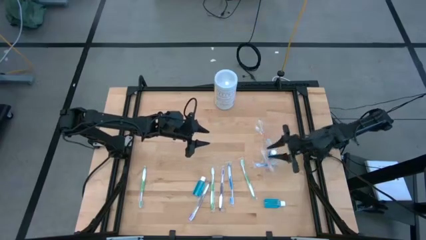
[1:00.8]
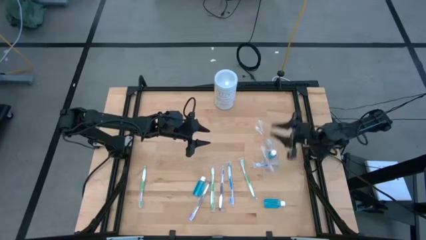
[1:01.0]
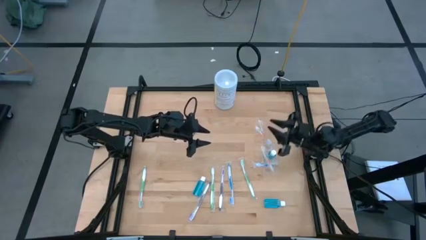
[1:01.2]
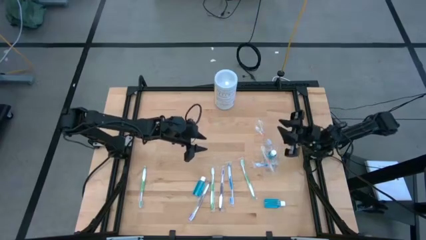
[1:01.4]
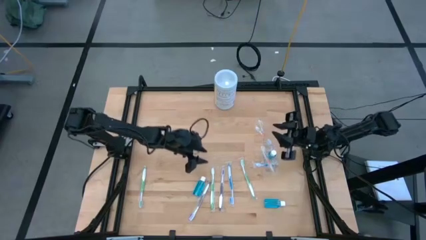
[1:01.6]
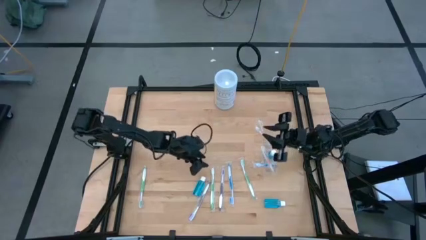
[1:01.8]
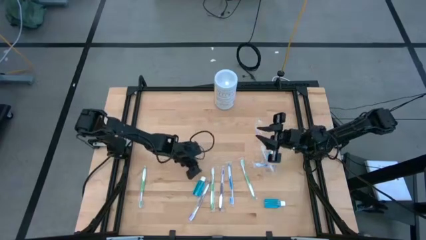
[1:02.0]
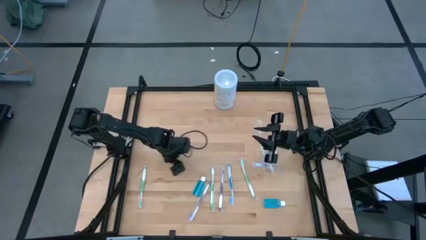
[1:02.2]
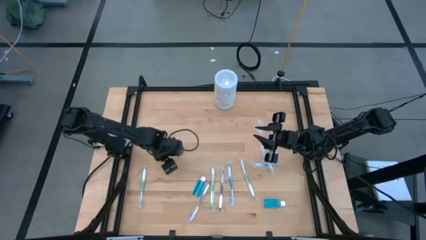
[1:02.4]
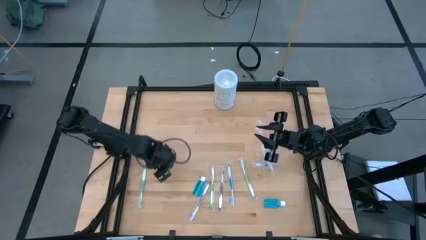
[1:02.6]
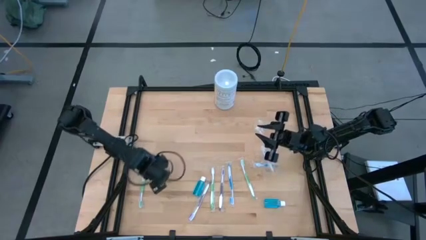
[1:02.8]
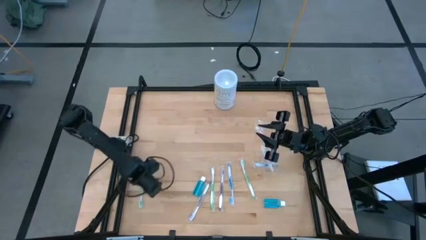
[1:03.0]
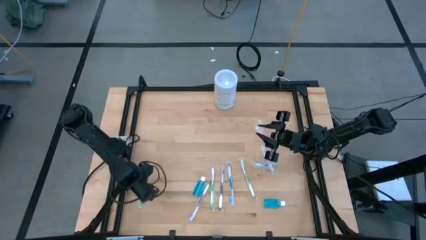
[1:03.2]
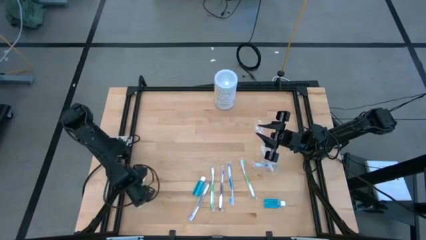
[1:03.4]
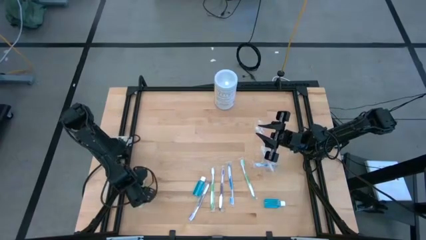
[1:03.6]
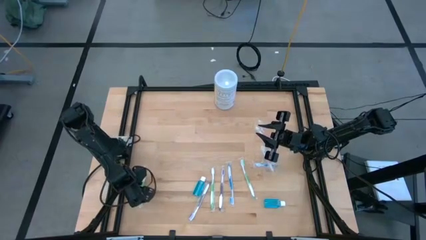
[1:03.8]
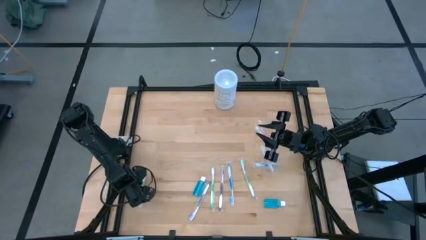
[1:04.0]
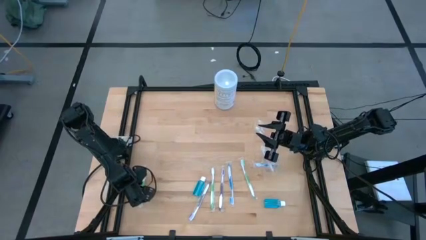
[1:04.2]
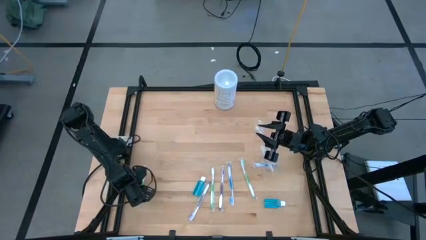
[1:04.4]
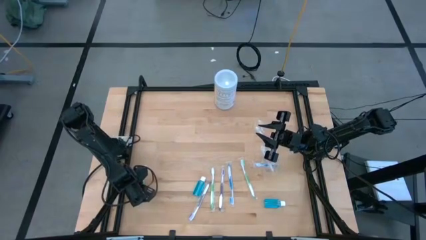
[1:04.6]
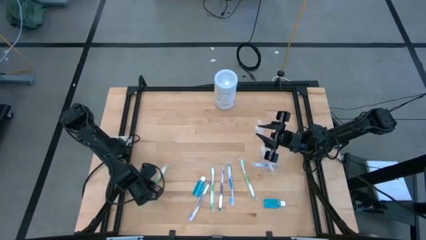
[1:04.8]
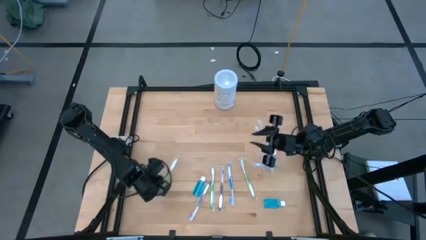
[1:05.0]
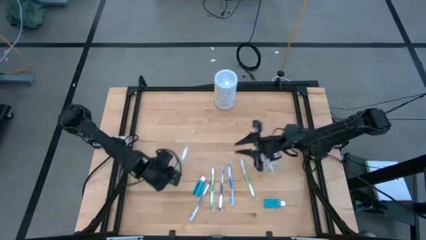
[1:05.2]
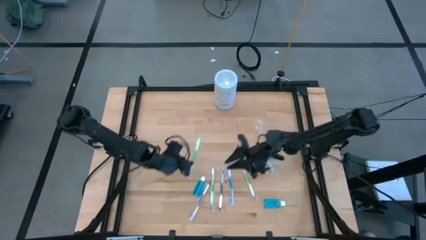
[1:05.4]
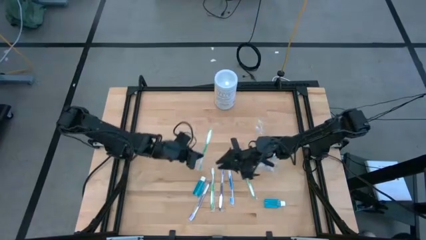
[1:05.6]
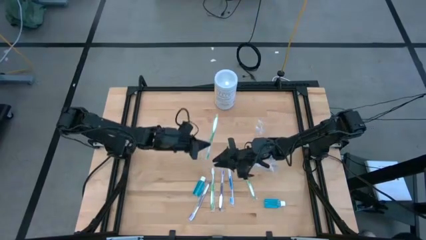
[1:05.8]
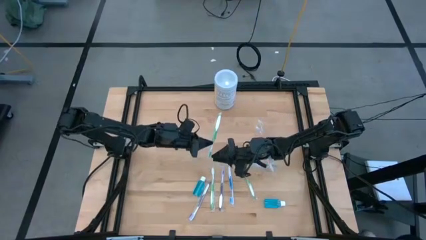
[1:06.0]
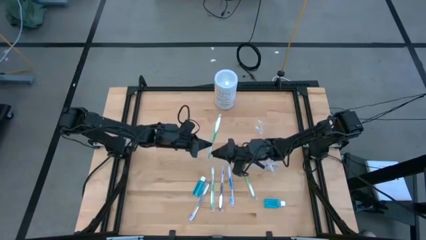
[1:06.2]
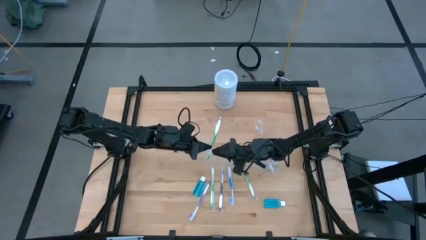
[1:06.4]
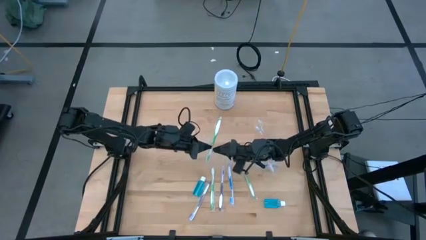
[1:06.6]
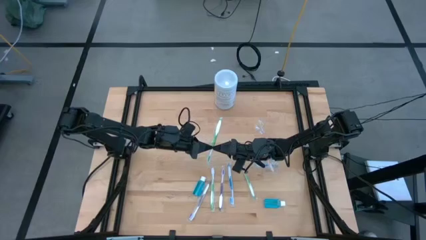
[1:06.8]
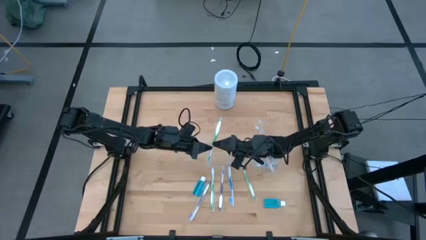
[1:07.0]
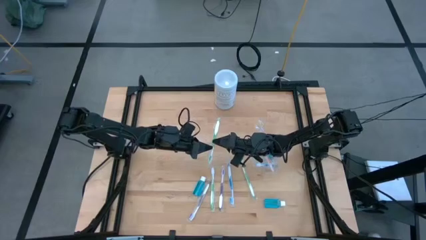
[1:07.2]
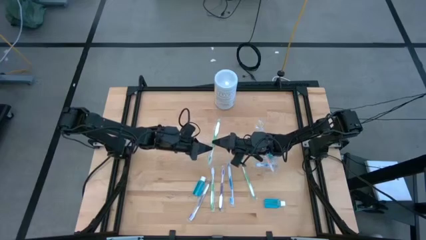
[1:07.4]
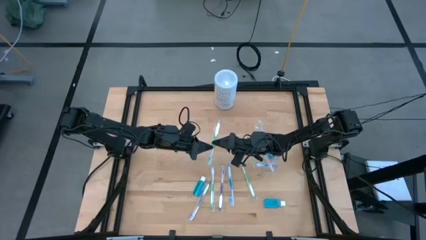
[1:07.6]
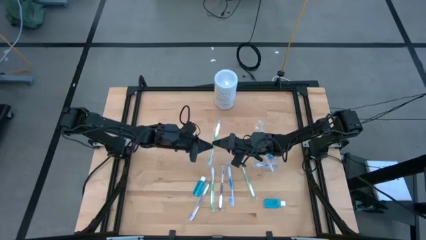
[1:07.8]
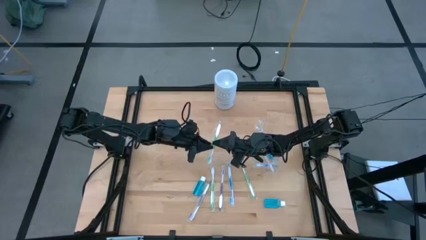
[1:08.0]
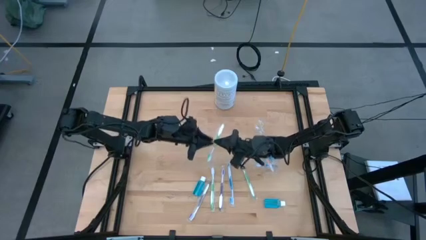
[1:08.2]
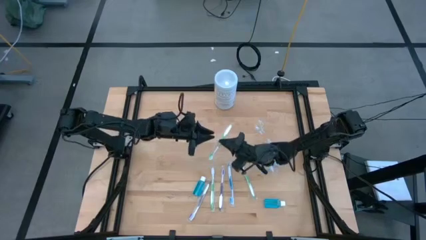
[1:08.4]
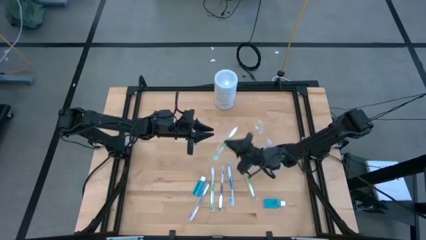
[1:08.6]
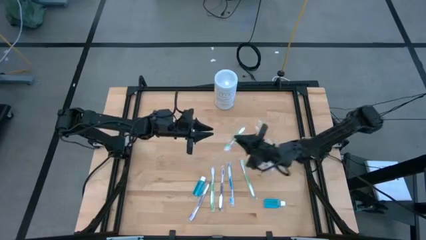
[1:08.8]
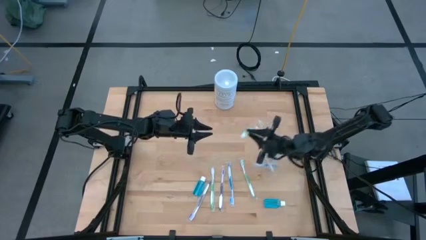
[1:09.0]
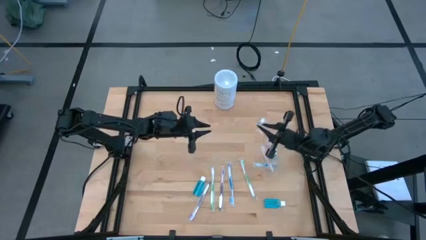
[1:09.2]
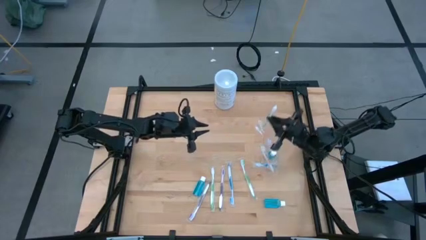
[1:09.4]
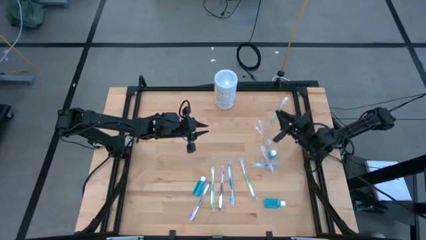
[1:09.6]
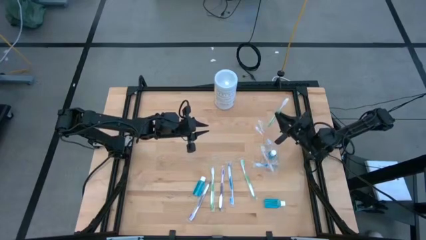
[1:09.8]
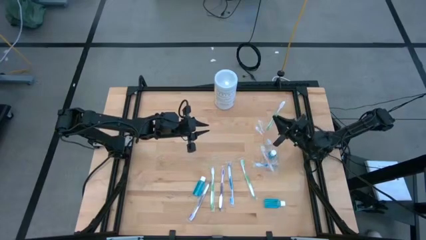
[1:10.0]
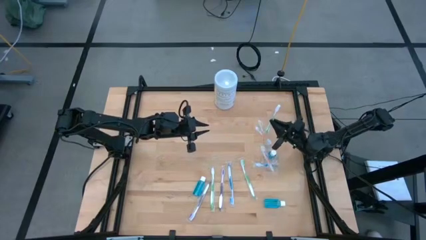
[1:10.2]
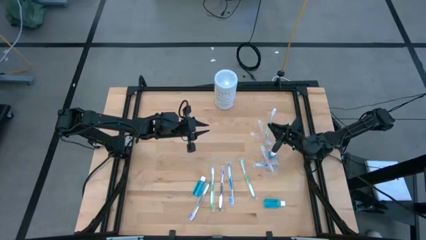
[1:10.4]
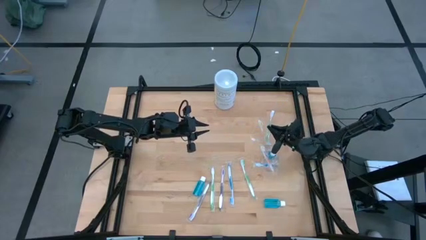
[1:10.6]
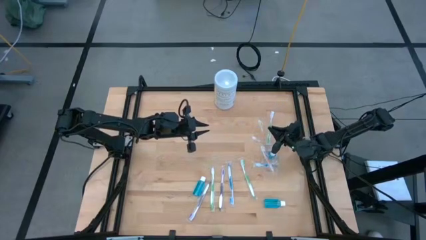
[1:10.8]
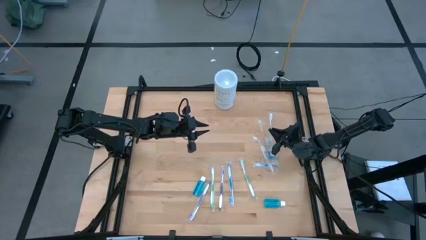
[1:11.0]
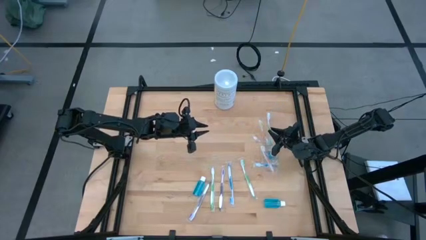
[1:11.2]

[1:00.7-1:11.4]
Task: Pick & Place toothbrushing station
Put the left green toothbrush into the transparent organizer
